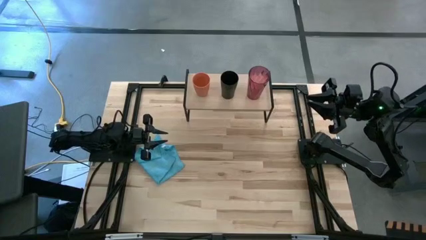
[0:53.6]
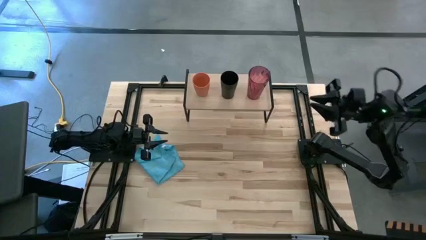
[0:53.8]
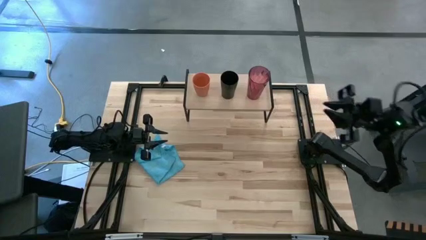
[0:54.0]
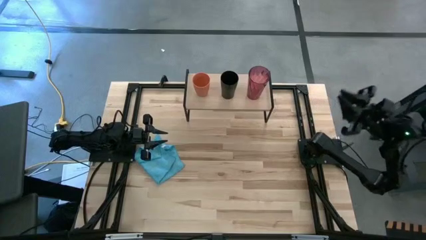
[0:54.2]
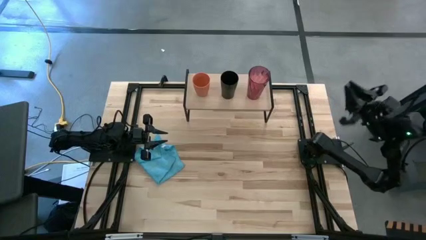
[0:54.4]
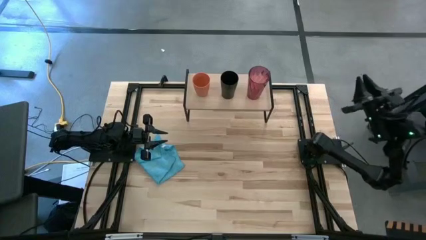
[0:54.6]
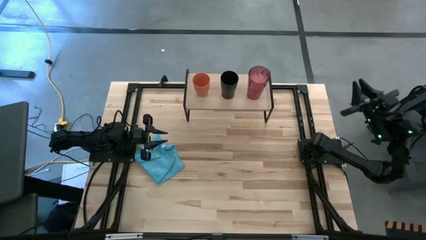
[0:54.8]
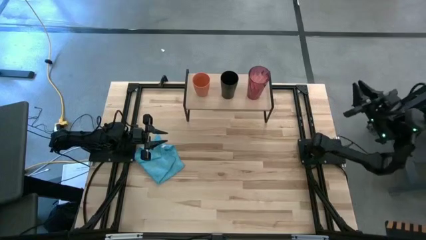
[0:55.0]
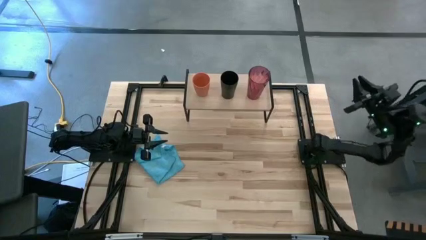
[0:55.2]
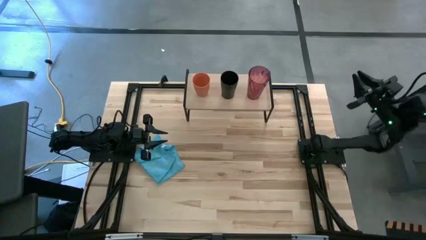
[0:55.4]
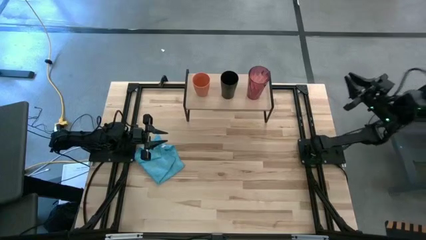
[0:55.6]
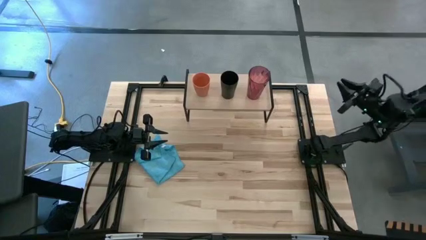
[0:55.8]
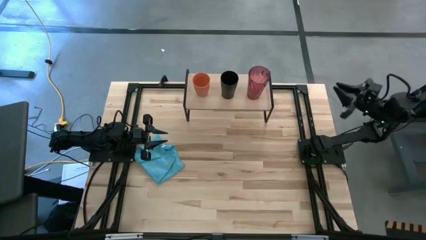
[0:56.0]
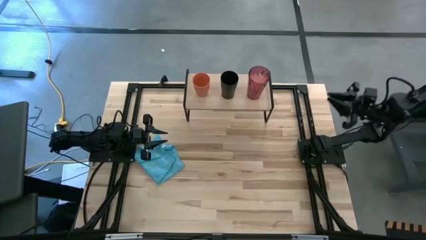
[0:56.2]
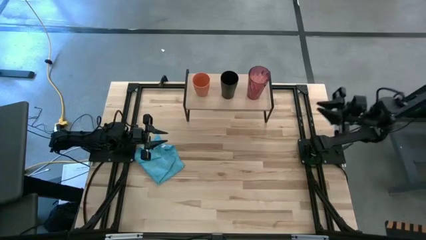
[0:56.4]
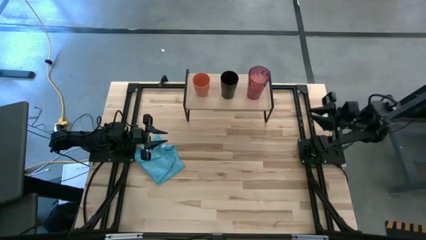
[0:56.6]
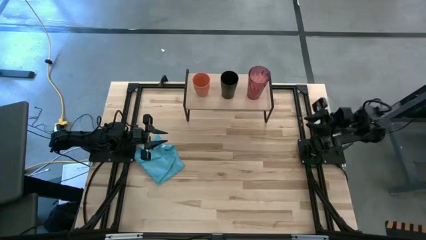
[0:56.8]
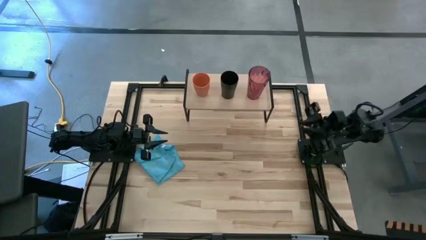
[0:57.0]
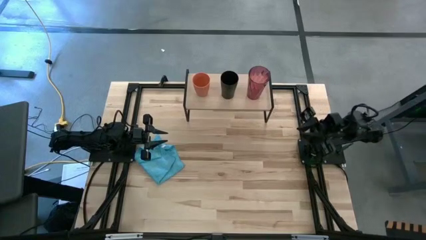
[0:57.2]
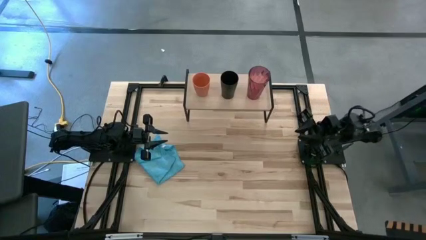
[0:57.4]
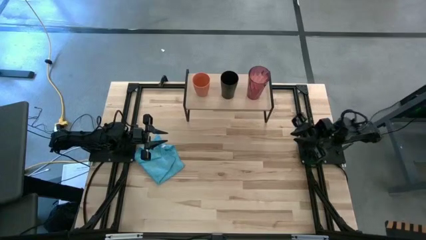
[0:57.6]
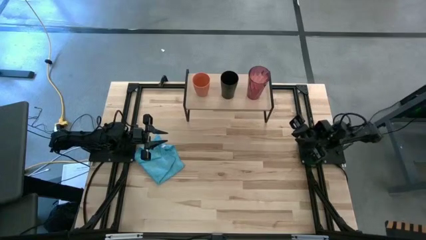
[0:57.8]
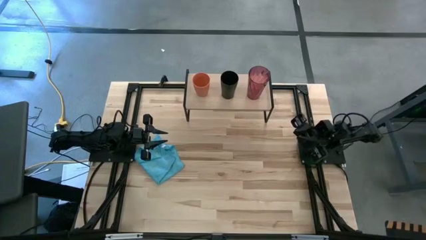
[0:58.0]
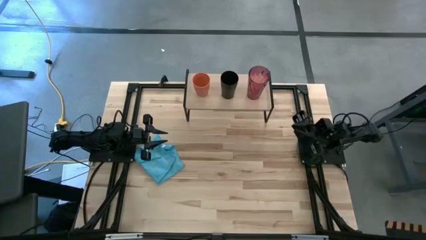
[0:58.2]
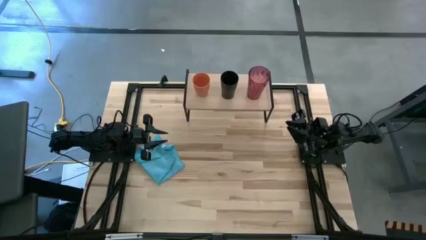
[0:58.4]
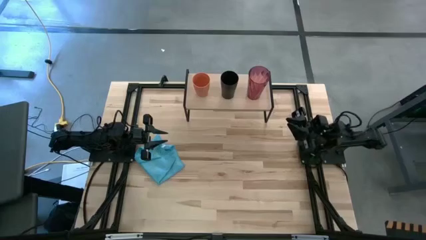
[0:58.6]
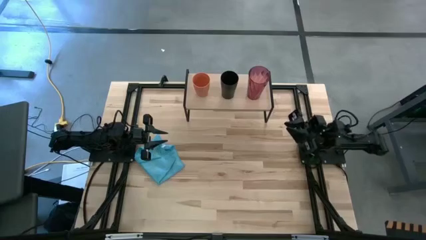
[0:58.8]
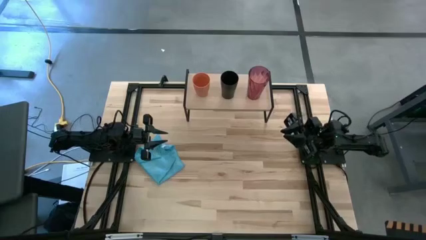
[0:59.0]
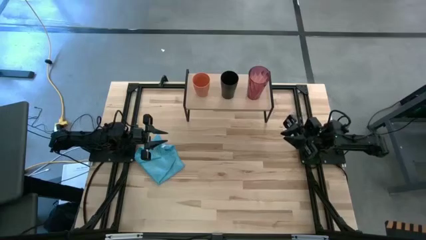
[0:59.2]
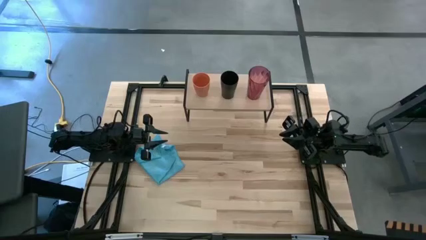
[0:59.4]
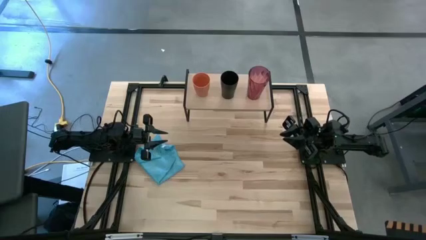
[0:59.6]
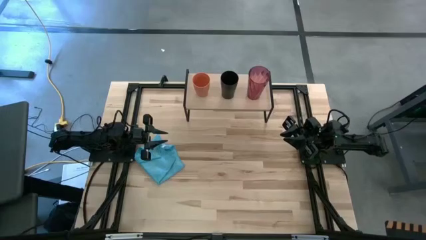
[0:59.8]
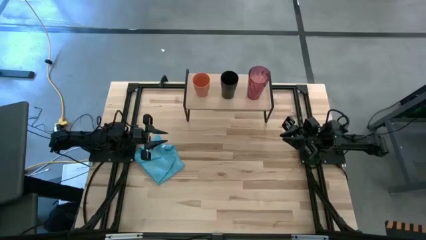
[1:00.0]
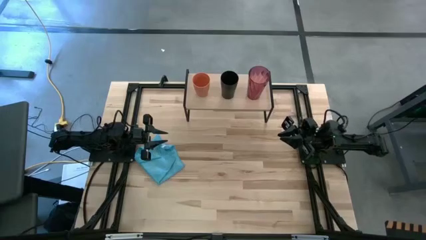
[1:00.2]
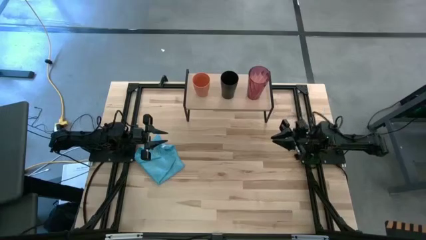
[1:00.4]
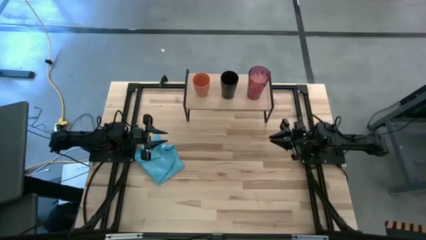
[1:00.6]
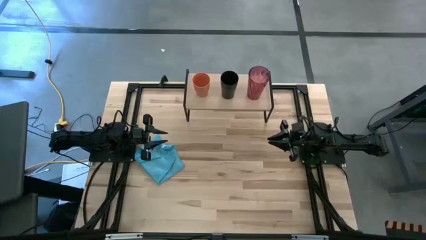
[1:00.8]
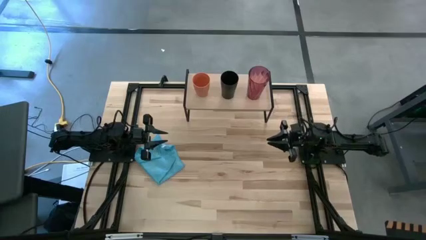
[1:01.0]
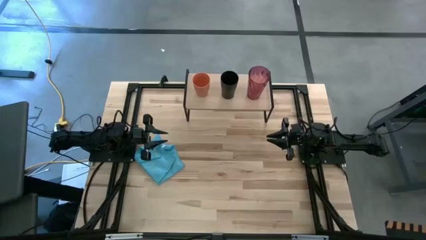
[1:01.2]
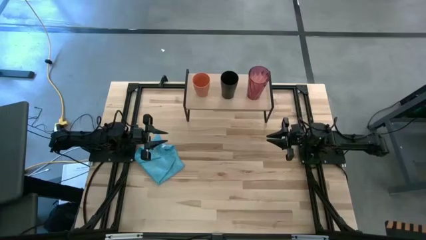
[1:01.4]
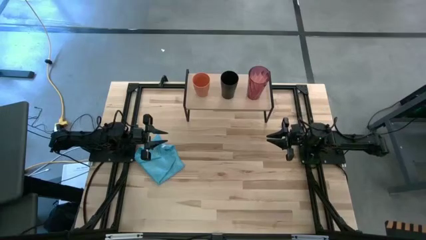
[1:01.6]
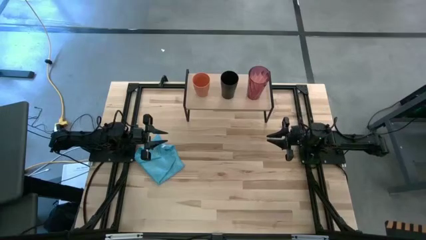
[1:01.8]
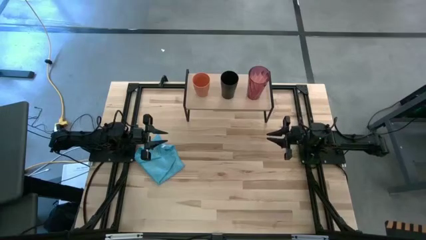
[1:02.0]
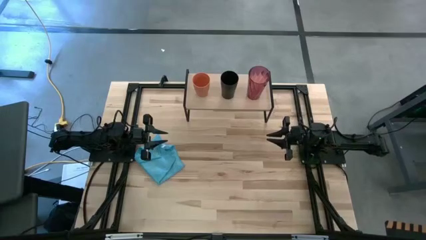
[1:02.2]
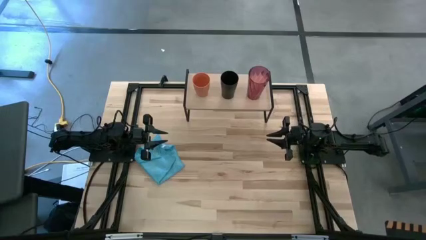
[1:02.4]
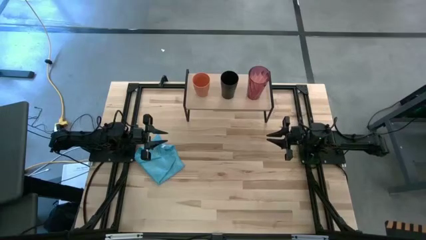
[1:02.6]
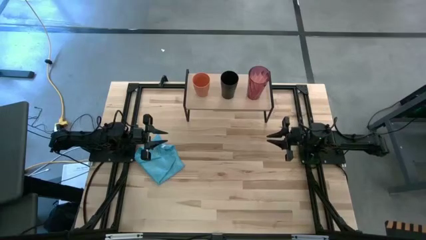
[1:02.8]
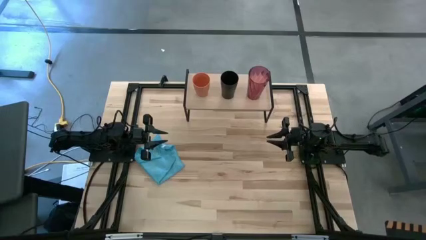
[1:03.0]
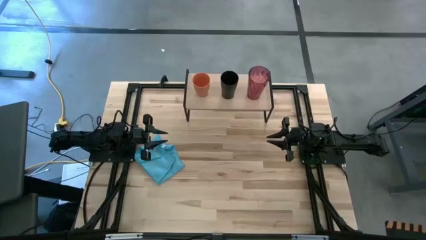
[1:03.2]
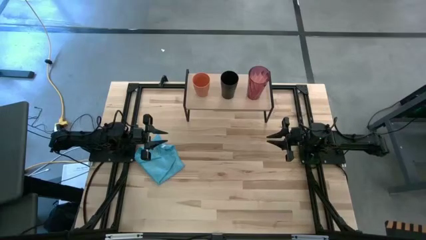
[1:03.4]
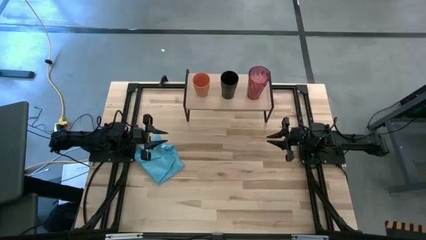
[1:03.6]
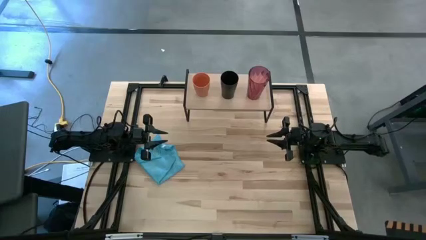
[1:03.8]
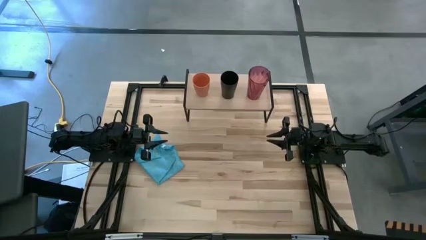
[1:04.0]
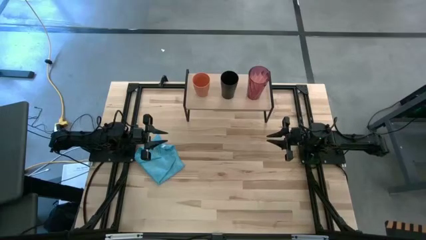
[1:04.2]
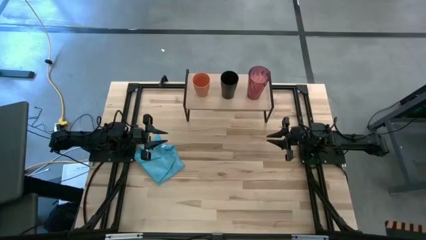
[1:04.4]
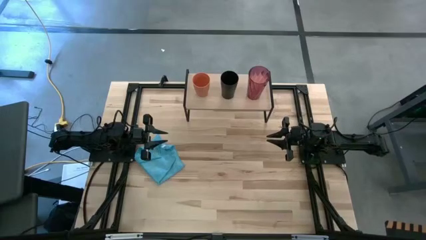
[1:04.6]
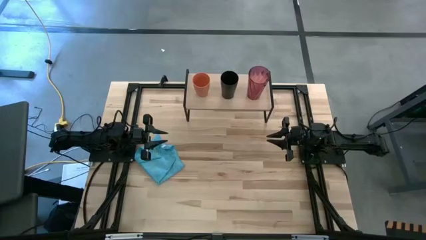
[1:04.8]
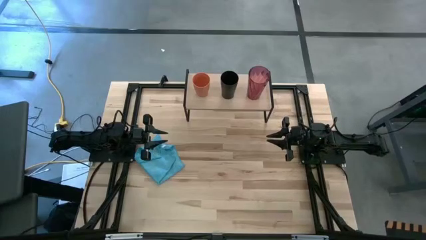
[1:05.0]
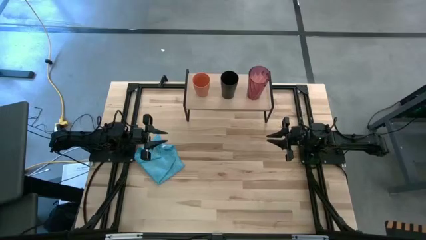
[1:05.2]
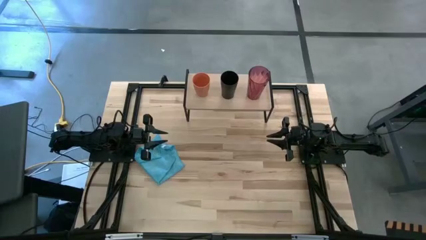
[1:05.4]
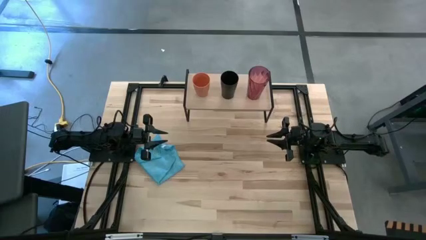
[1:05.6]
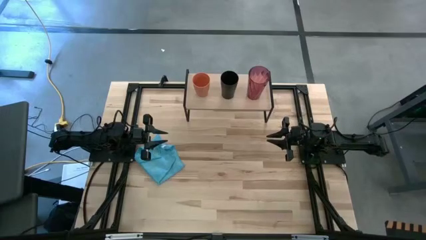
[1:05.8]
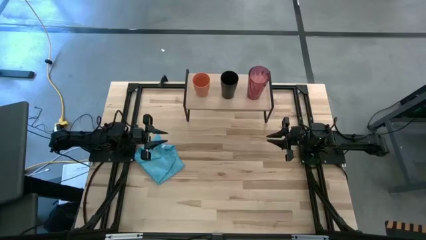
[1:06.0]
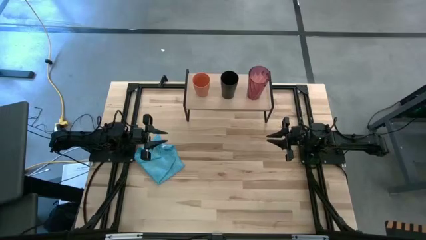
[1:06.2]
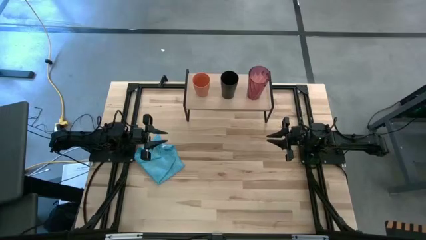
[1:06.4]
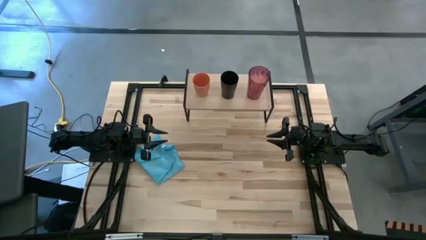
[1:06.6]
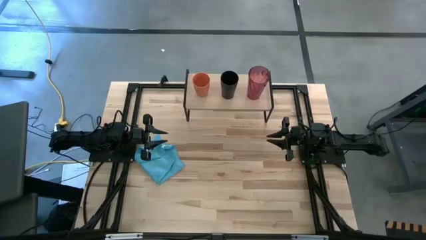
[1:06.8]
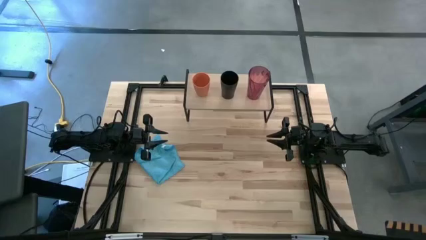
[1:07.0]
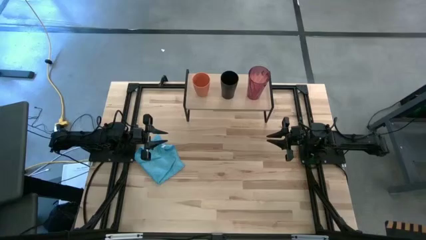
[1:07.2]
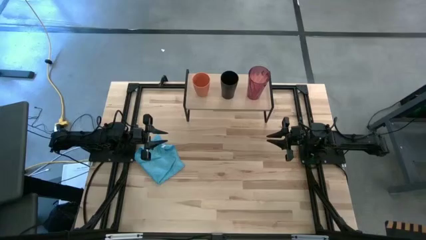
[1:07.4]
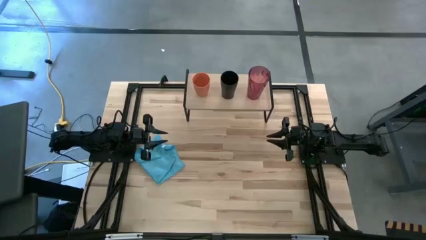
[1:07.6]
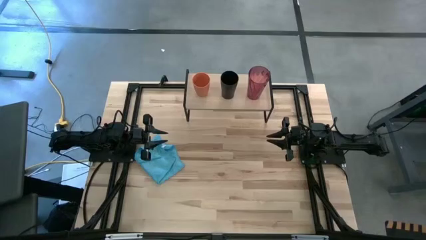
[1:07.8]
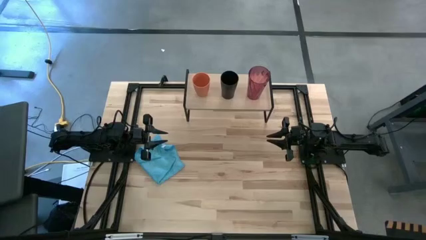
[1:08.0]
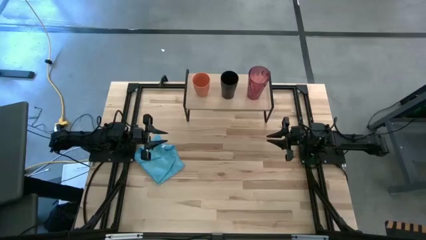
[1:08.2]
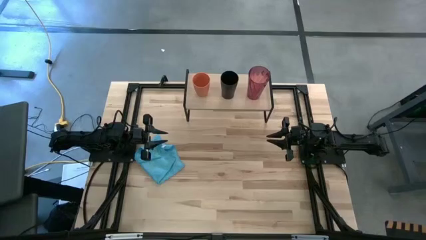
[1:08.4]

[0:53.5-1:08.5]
Task: Stack small to large cups/mugs on shelf
Return to Home Position
